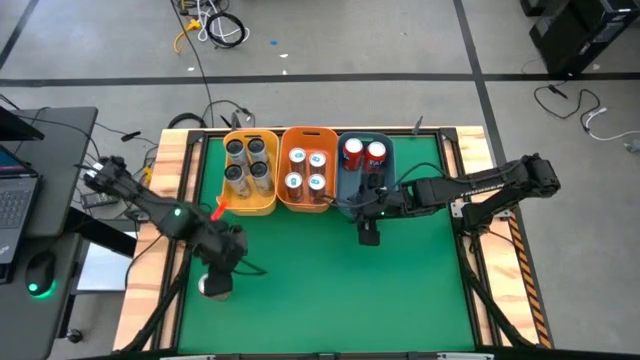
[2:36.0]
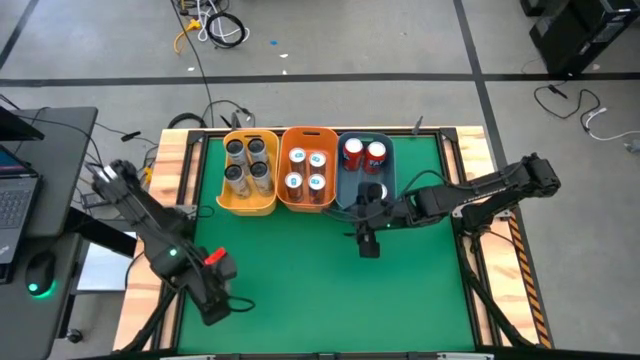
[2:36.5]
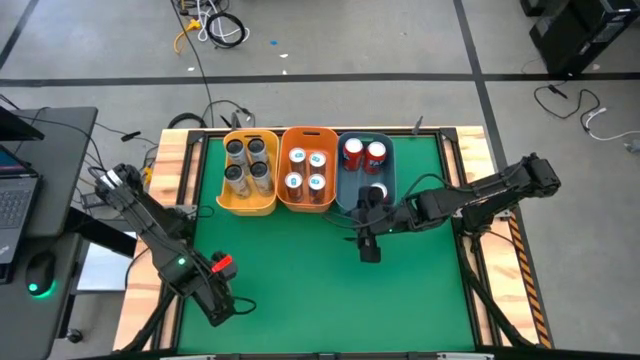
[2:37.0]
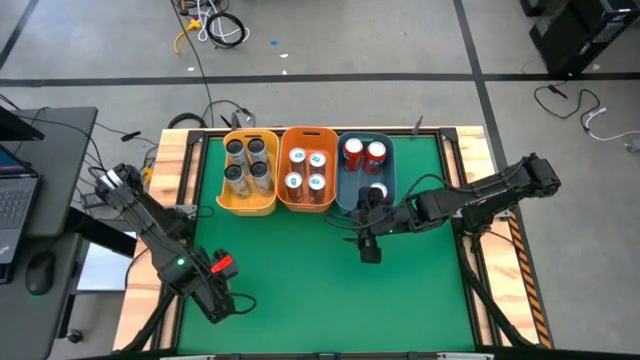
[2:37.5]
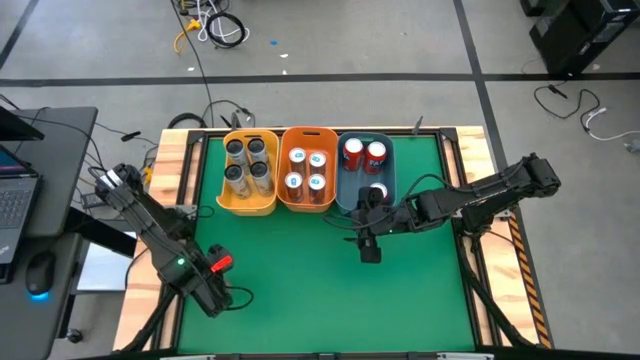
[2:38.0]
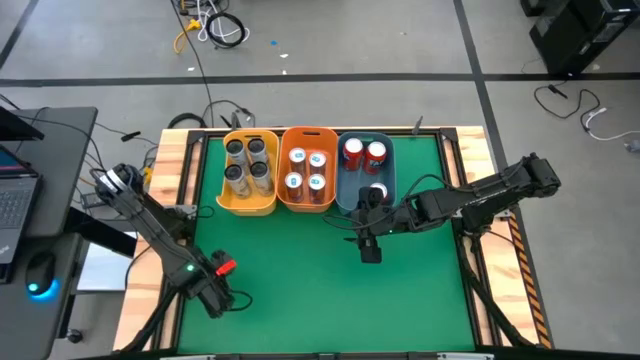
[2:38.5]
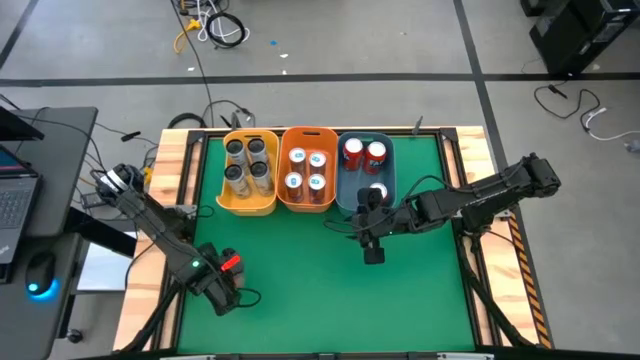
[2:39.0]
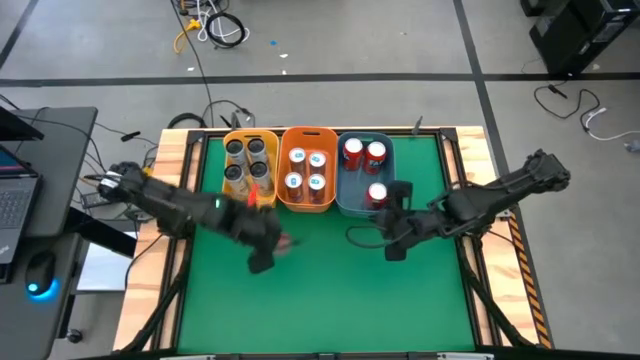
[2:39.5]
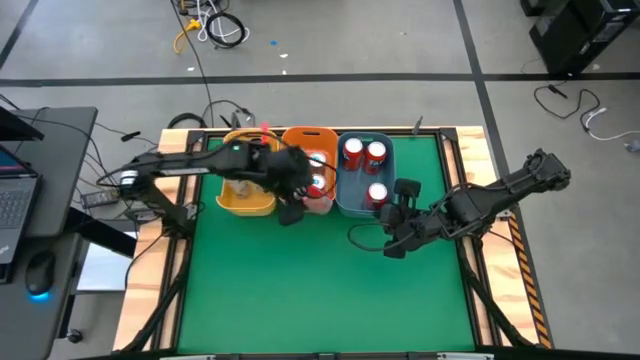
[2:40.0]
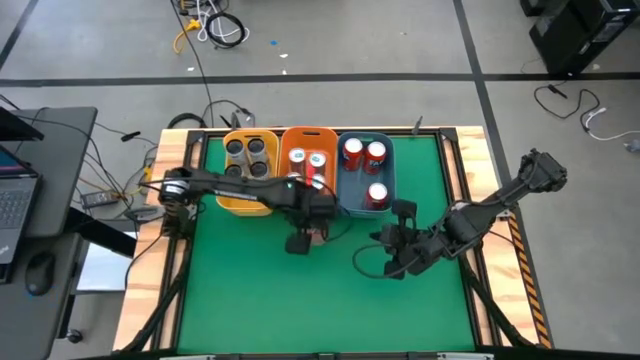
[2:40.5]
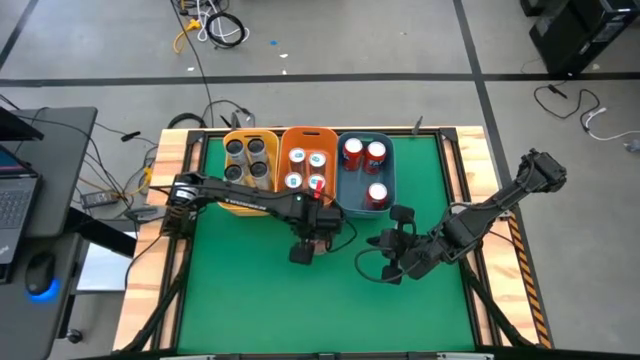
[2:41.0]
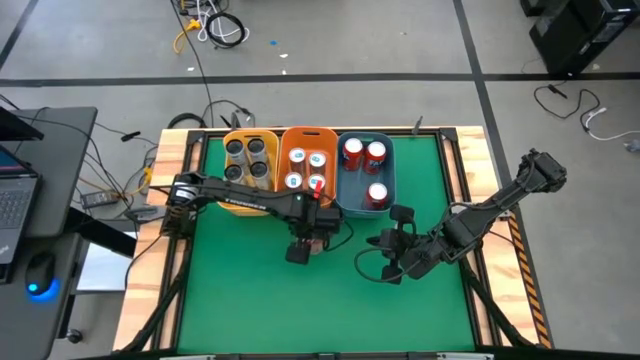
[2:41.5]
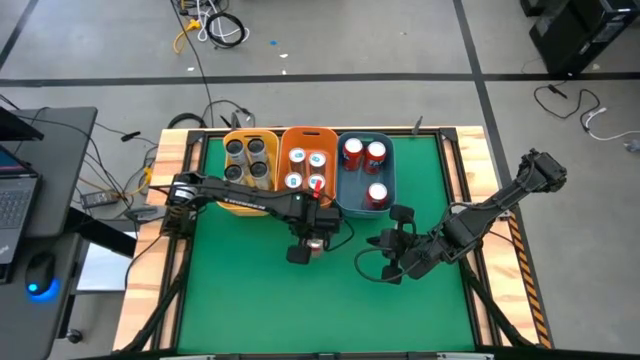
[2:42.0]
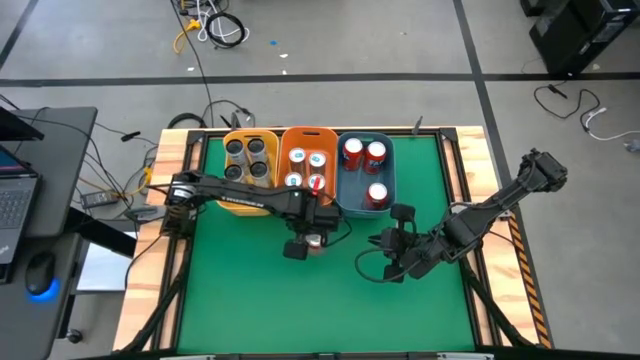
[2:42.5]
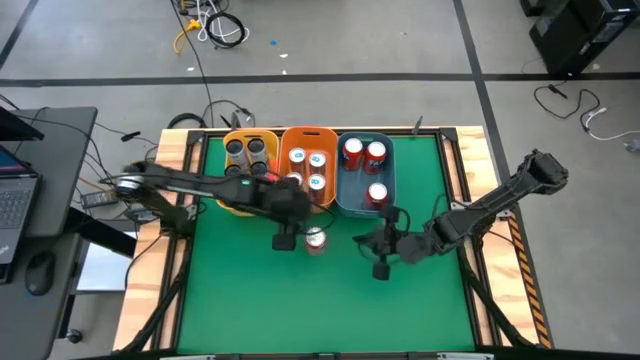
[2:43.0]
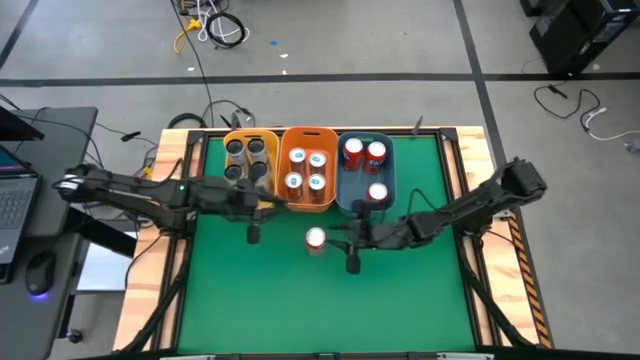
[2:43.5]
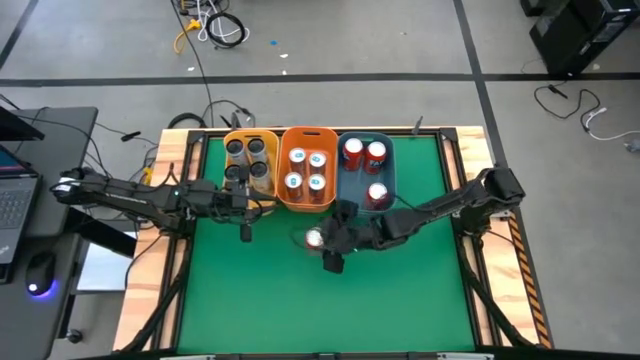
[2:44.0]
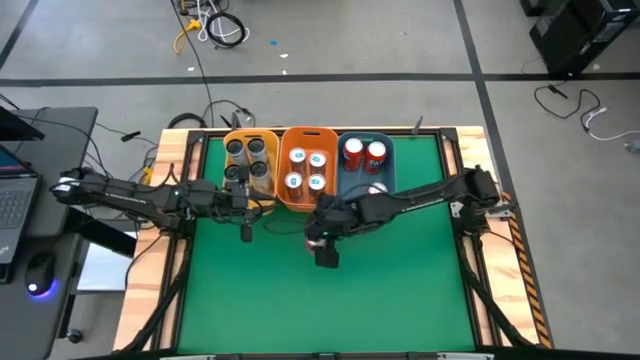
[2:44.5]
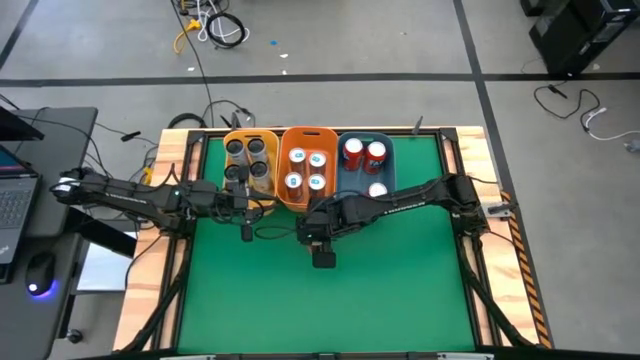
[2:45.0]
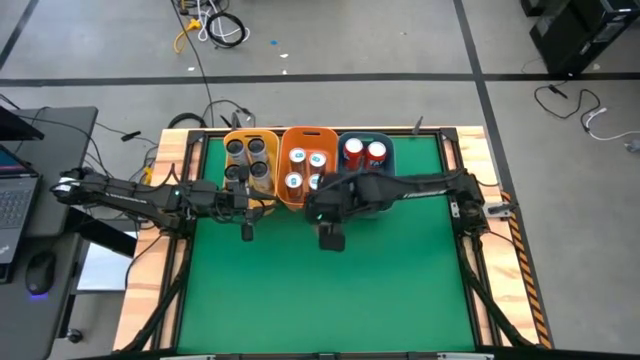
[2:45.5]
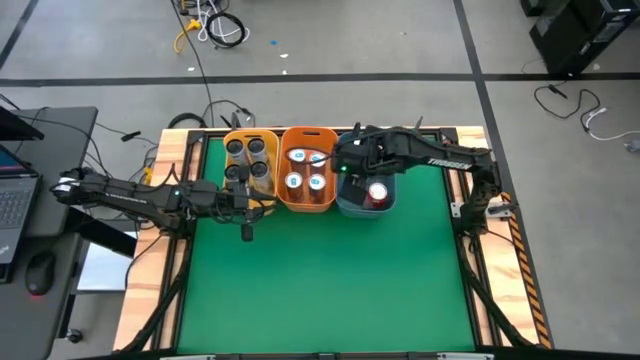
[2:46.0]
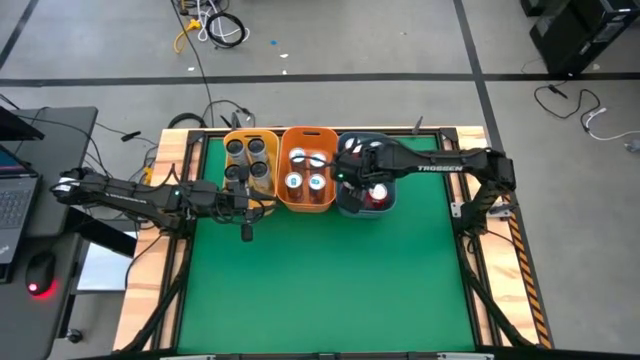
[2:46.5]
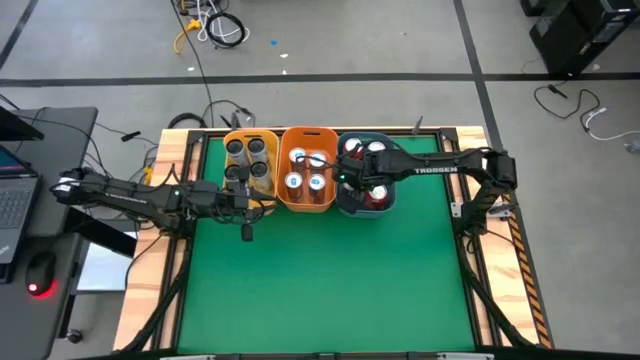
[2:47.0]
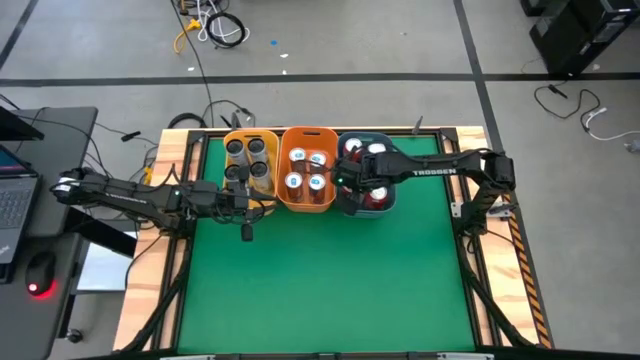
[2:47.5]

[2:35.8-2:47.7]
Task: Sort soda cans
Put the orange soda can into the blue bin

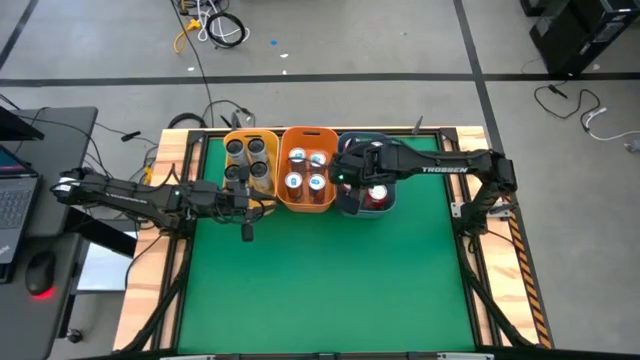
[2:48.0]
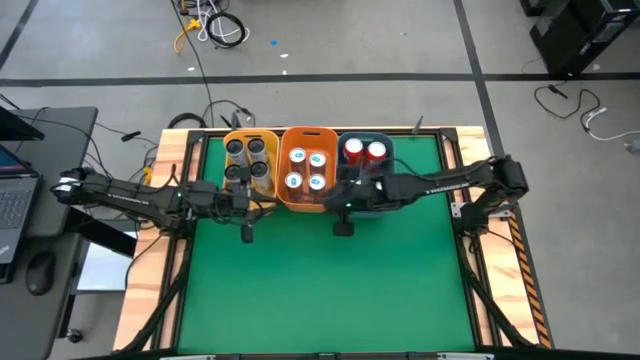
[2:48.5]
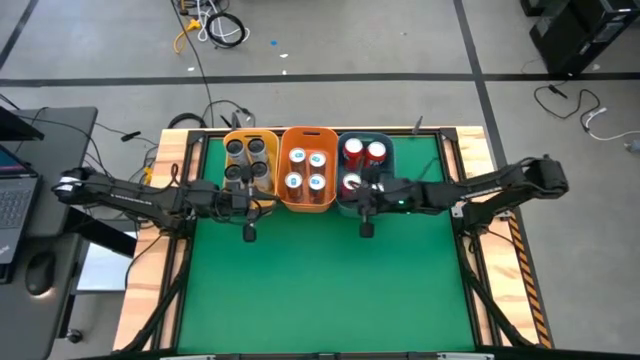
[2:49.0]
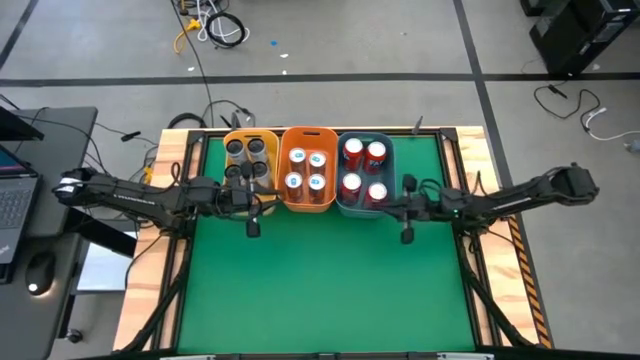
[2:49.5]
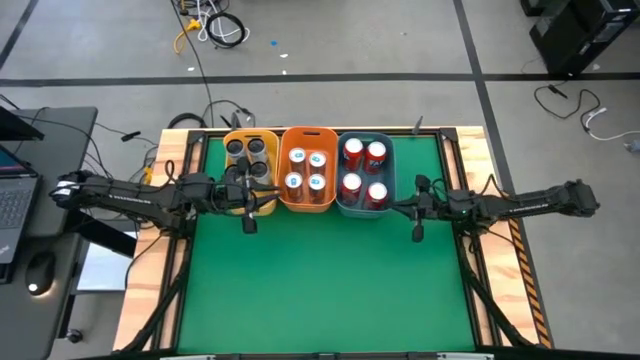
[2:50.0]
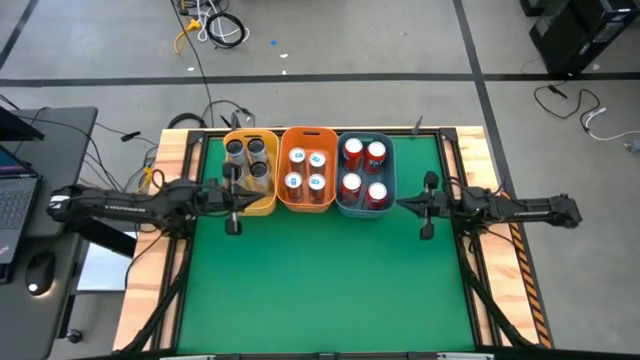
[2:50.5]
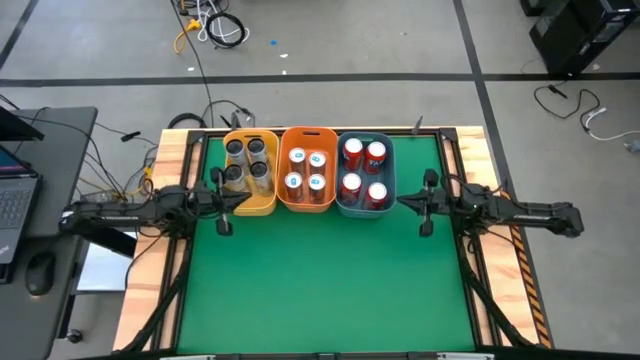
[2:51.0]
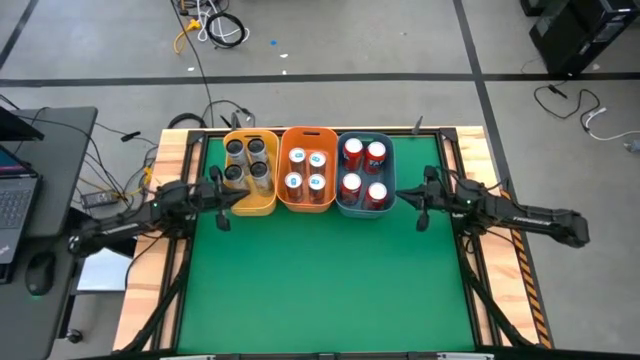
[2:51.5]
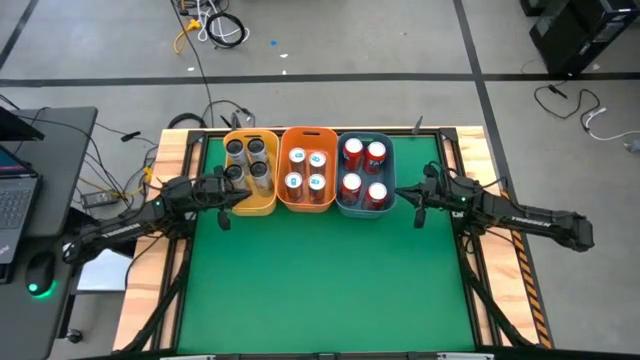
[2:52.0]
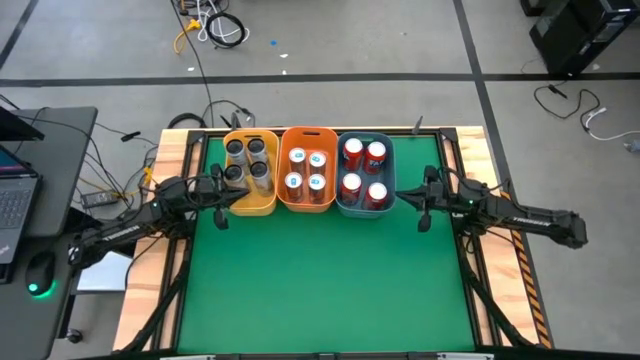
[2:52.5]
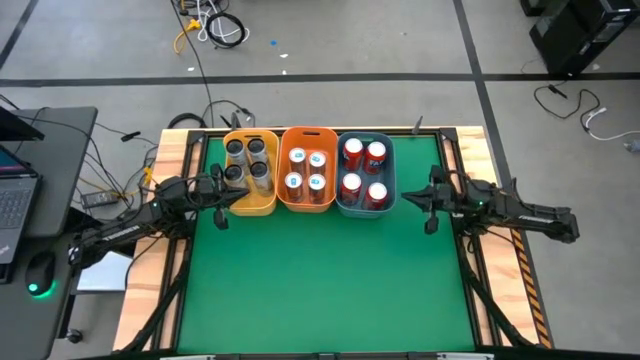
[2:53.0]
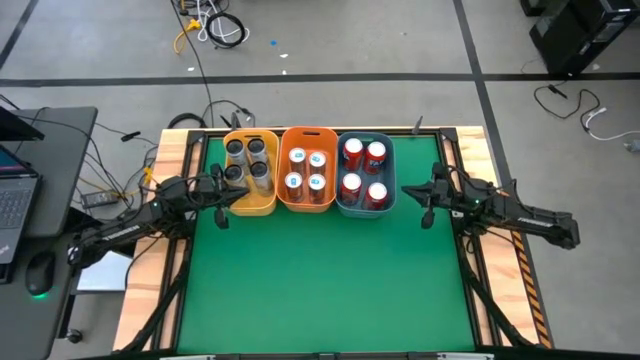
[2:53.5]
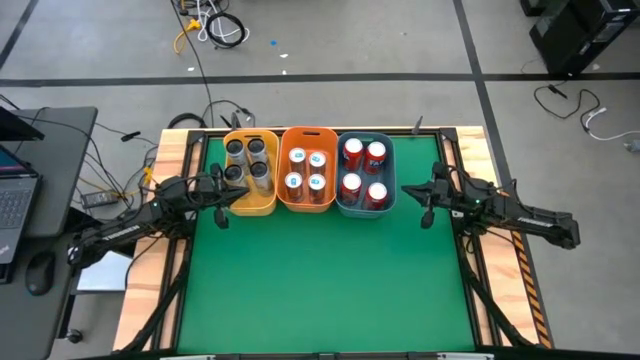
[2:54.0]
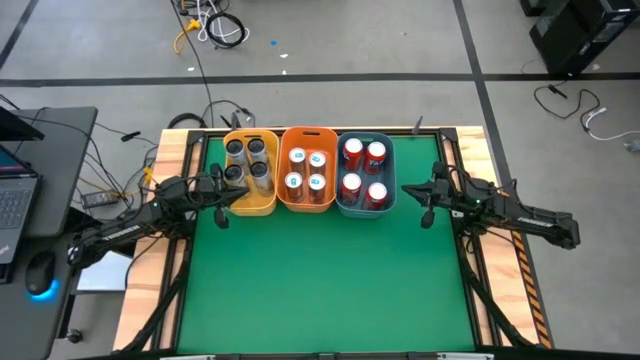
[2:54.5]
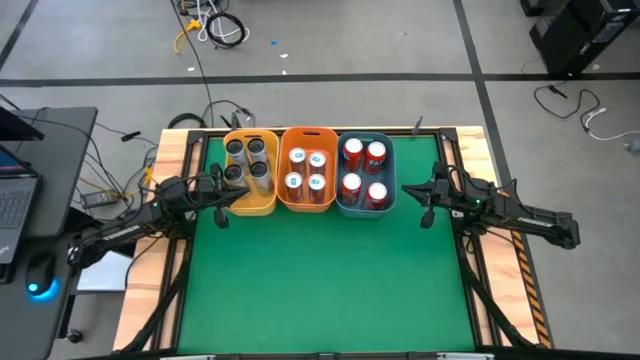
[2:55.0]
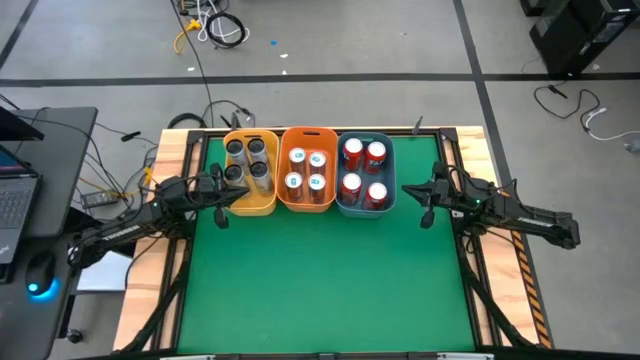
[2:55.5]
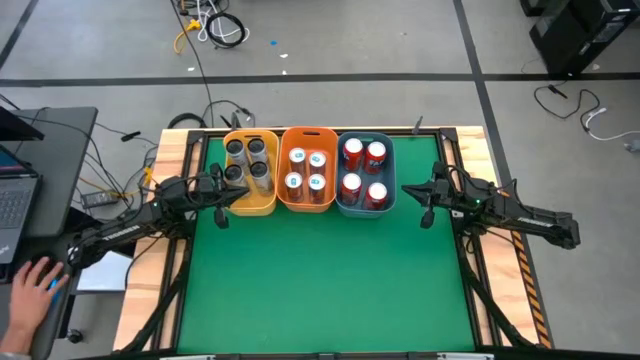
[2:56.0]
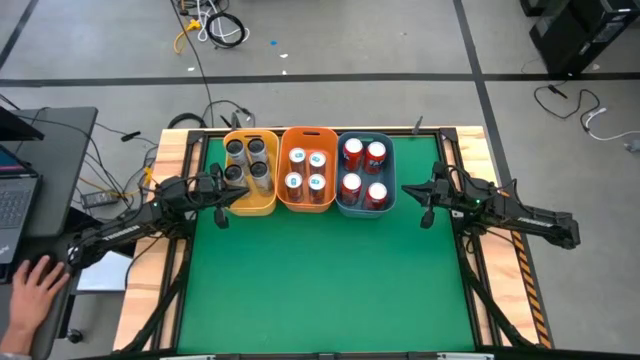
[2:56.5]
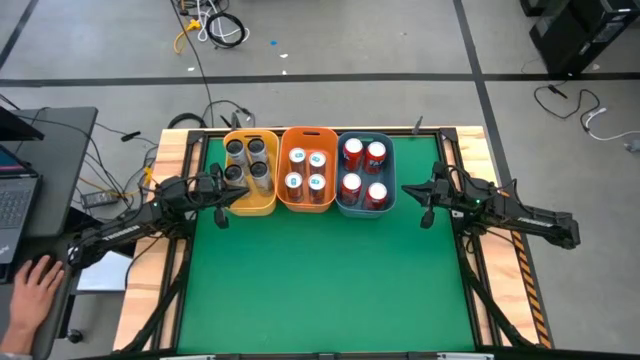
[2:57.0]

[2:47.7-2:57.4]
Return to Home Position
